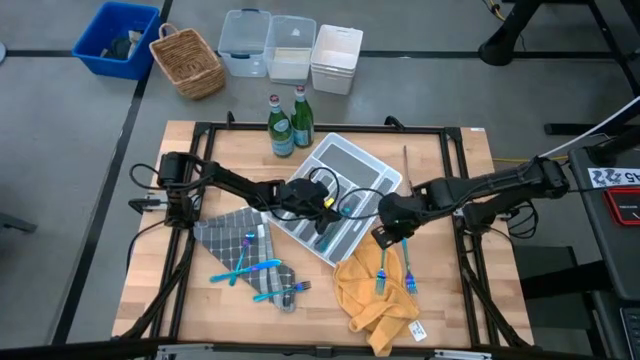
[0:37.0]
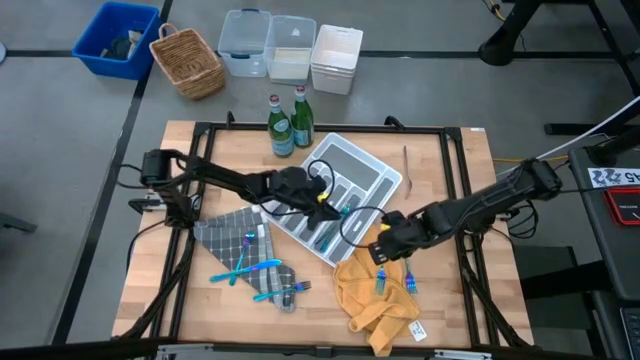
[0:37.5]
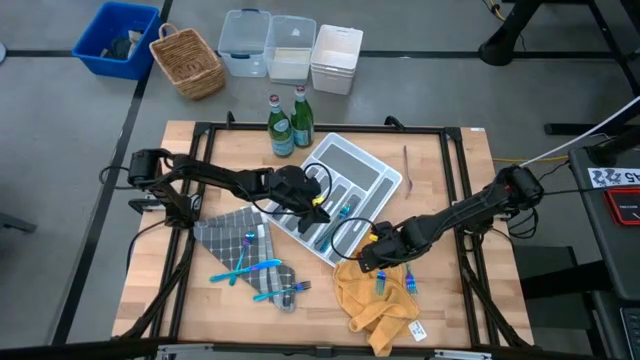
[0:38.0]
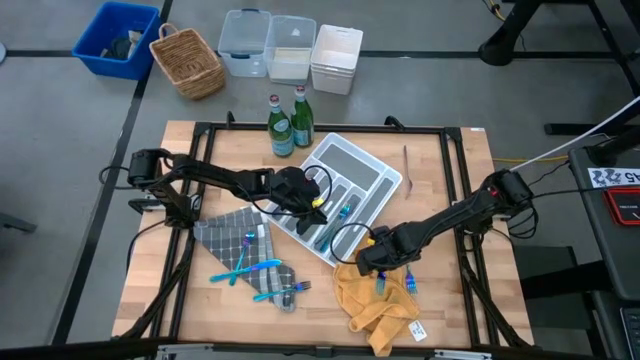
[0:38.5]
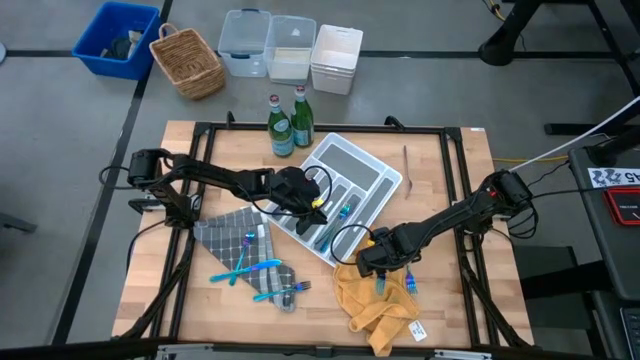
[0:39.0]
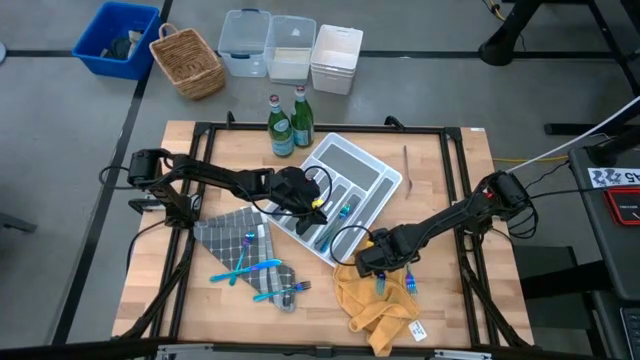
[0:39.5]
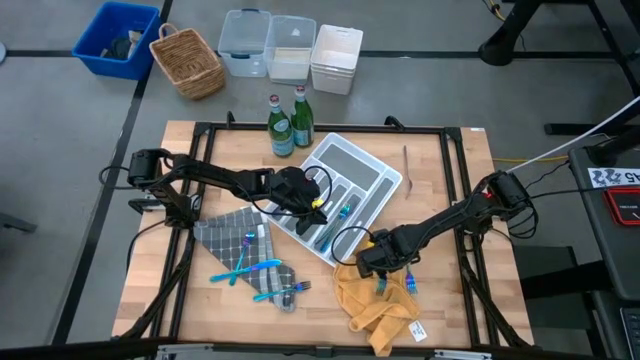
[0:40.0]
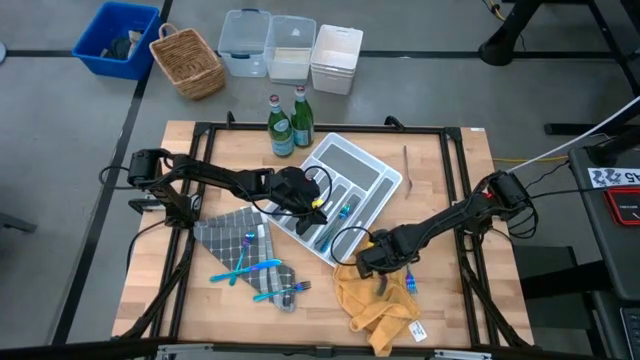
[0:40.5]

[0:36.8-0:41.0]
Put the blue fork into the cutlery tray

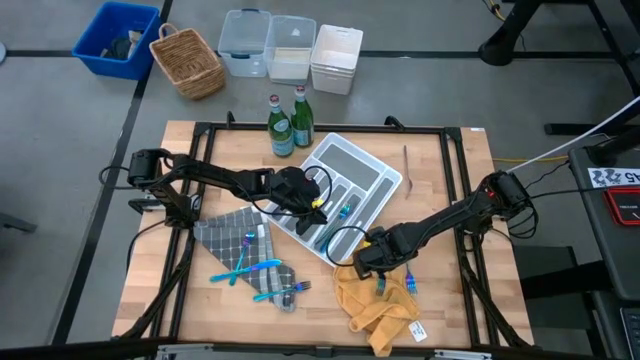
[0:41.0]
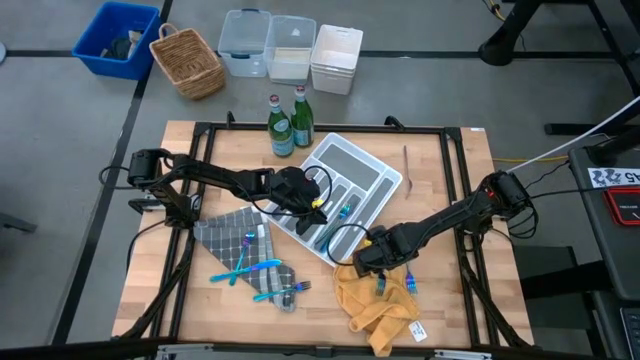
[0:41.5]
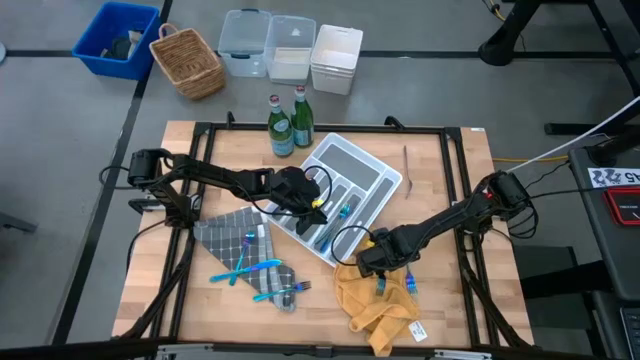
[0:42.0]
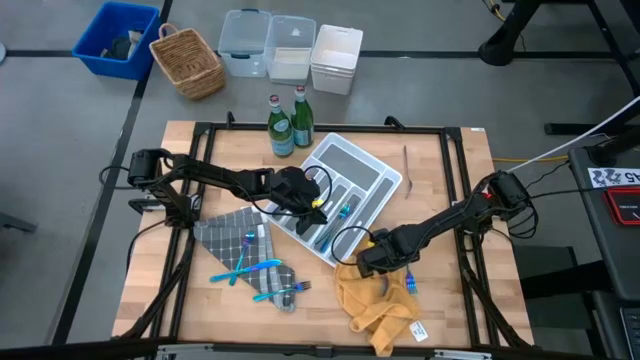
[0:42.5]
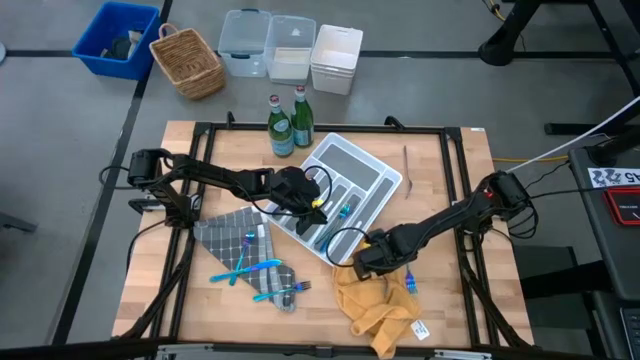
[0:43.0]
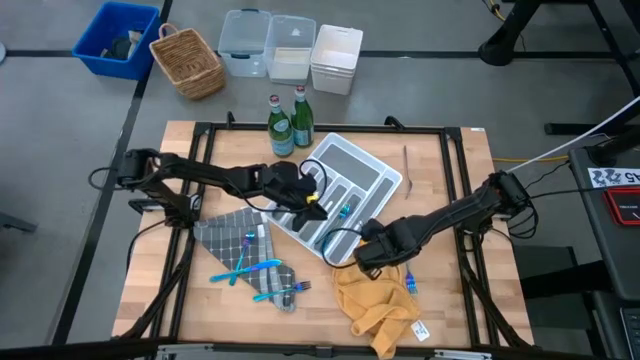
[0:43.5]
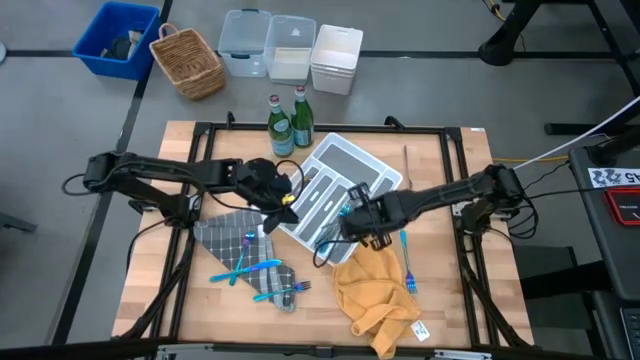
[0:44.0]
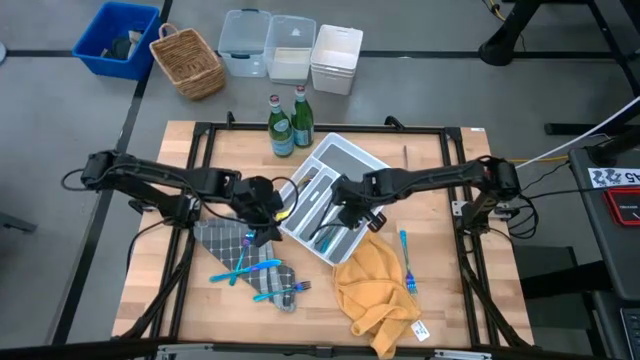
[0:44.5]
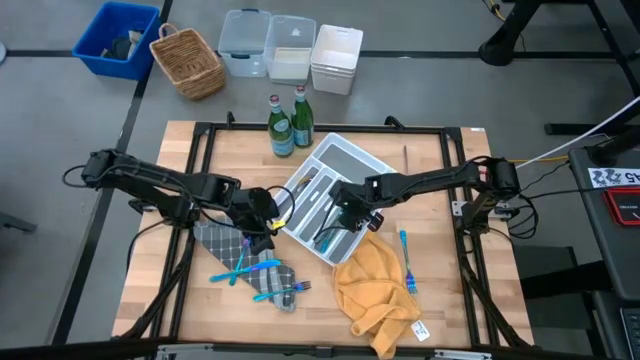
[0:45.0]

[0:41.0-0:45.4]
Put the blue fork into the cutlery tray

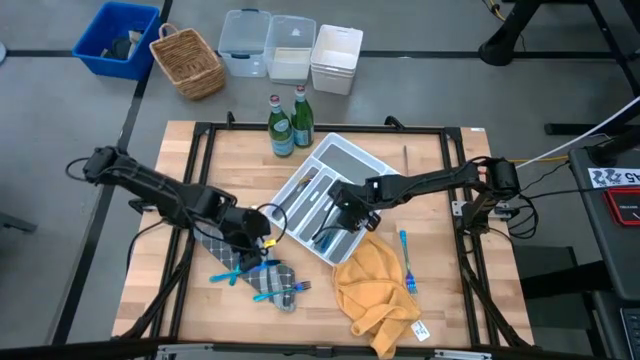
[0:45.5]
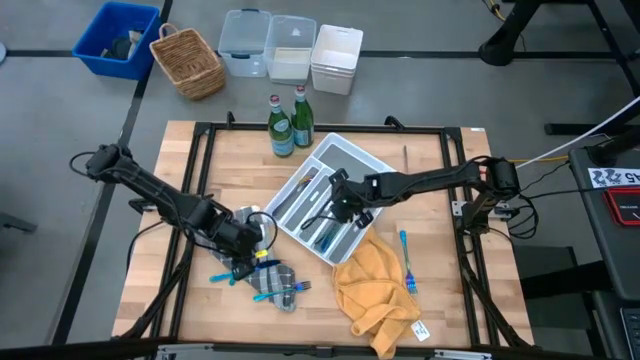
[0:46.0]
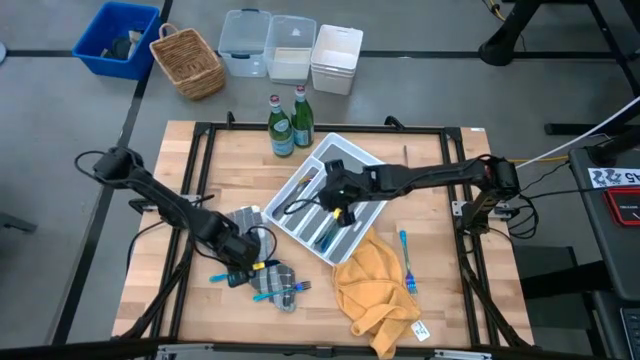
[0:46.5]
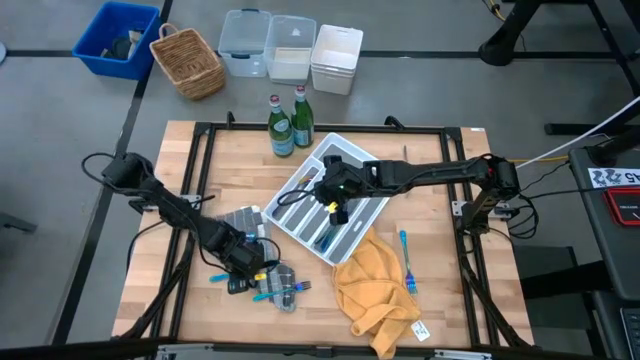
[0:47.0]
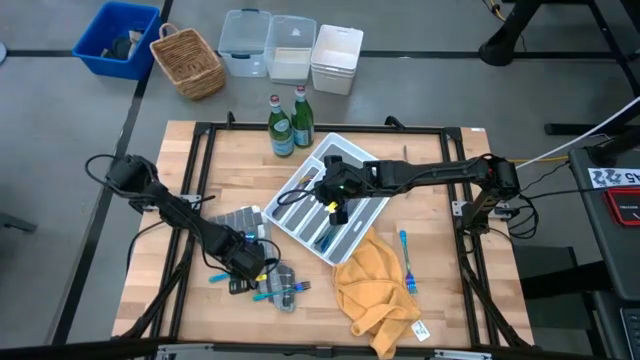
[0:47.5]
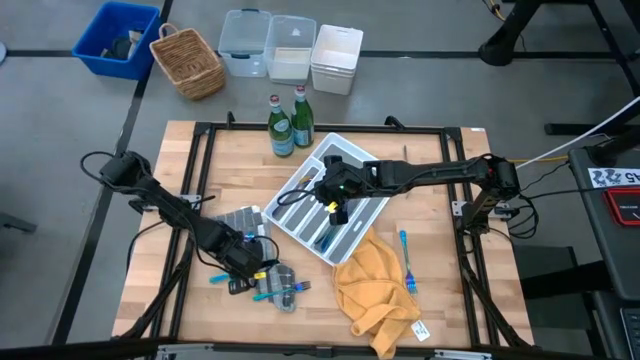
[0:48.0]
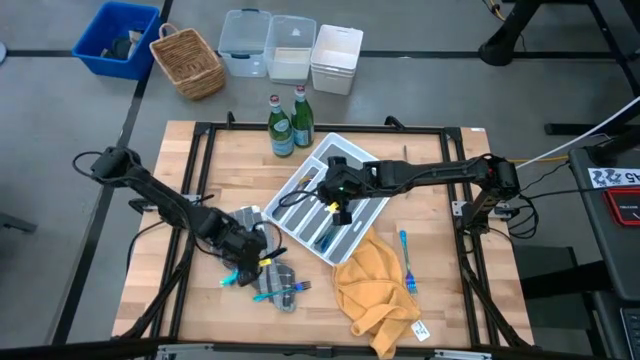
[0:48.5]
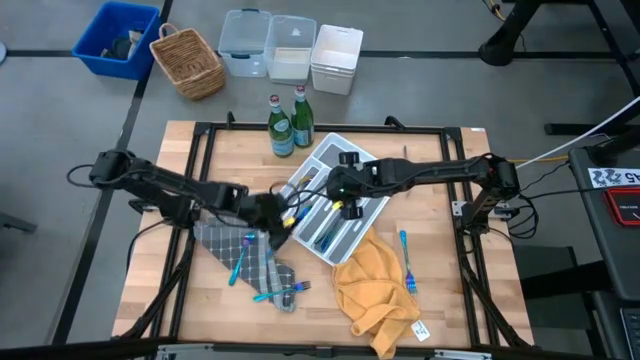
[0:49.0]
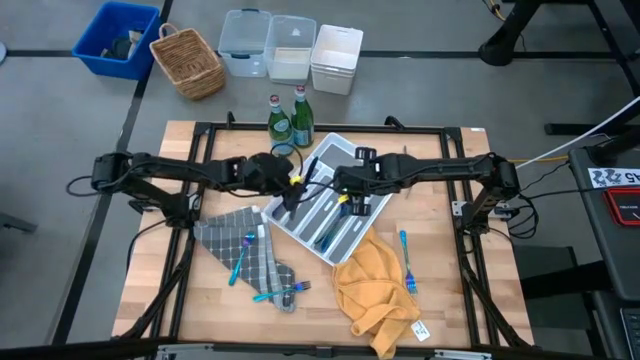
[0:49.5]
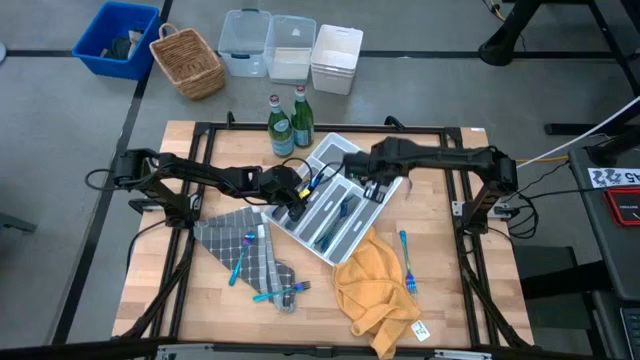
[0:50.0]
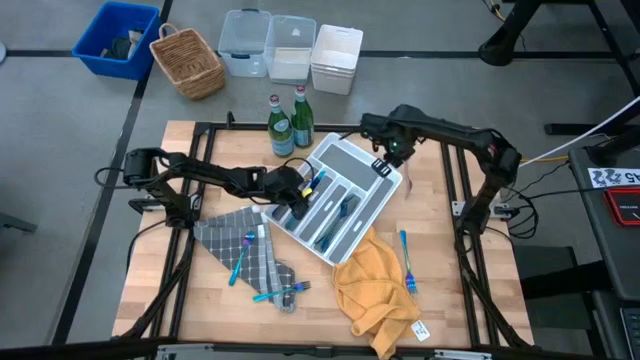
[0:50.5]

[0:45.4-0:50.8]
Put the blue knife into the cutlery tray

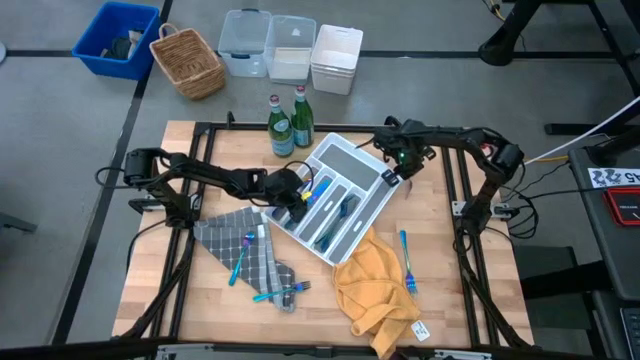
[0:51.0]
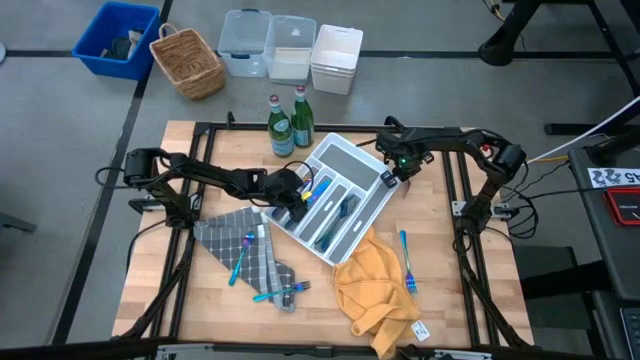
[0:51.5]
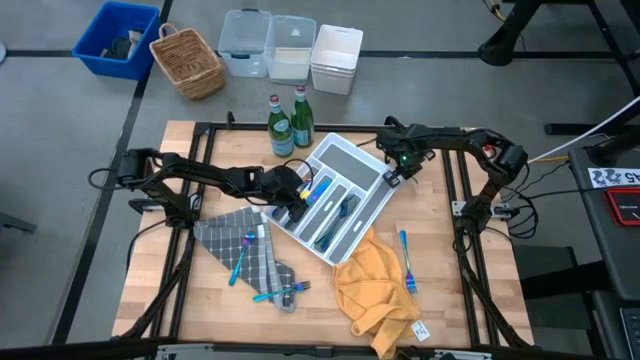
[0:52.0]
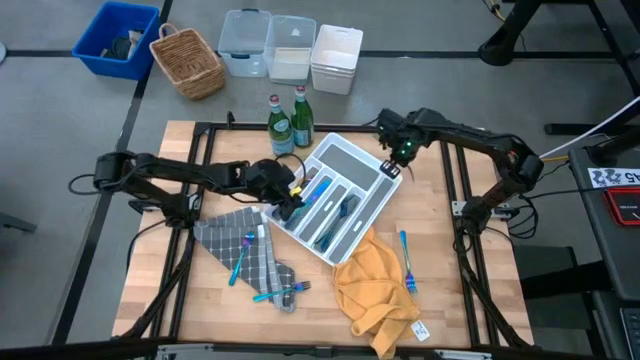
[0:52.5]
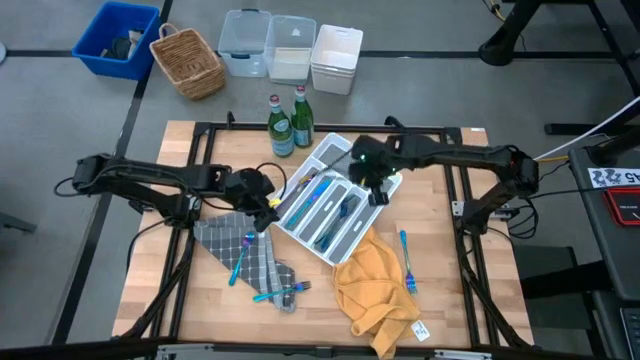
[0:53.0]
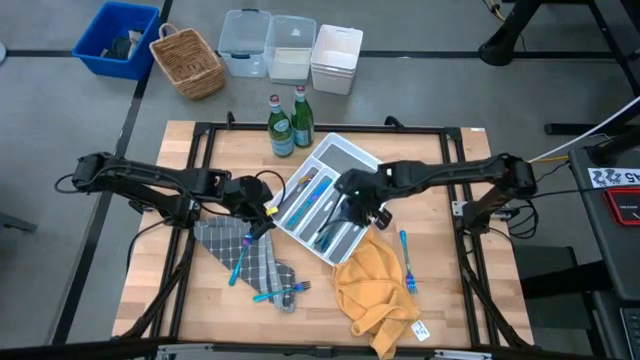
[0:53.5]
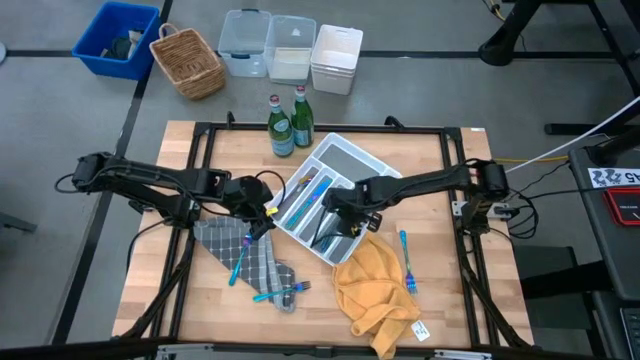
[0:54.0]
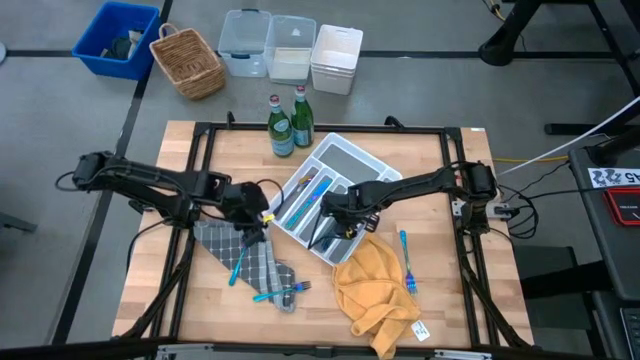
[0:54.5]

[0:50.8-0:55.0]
Put the blue fork into the cutlery tray

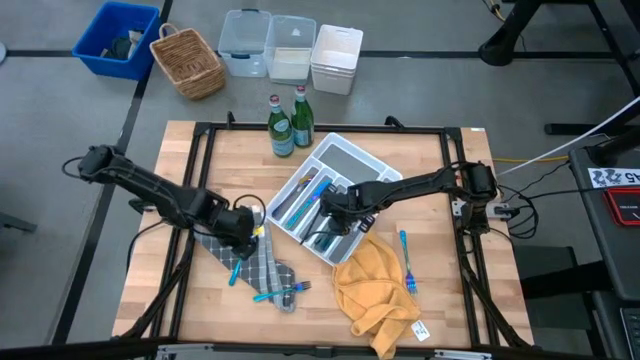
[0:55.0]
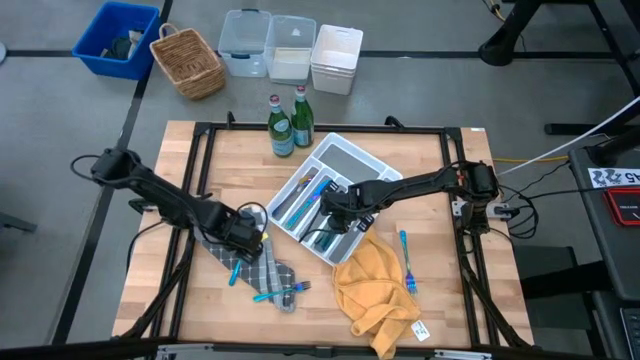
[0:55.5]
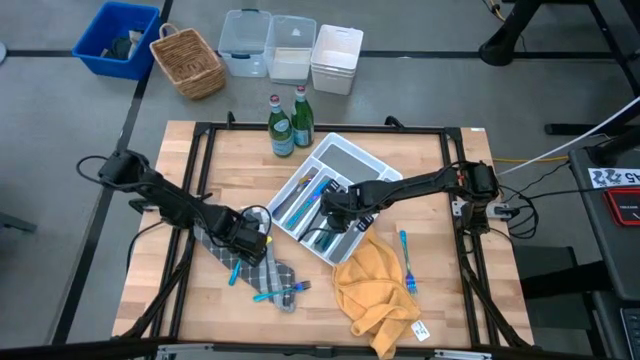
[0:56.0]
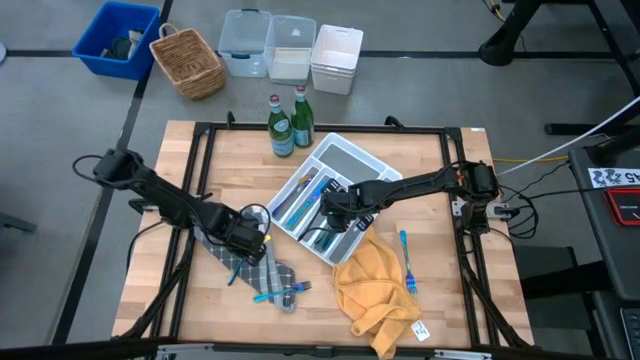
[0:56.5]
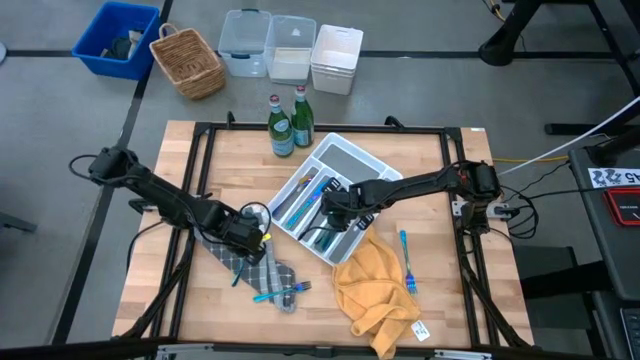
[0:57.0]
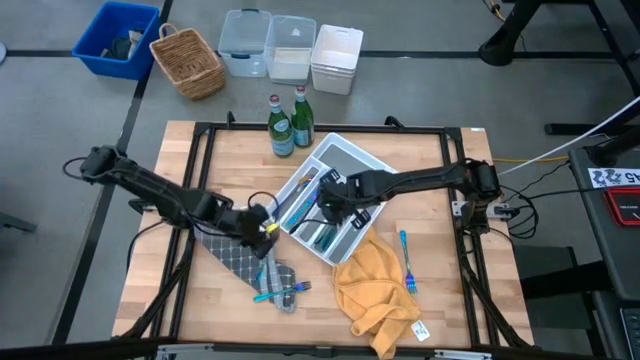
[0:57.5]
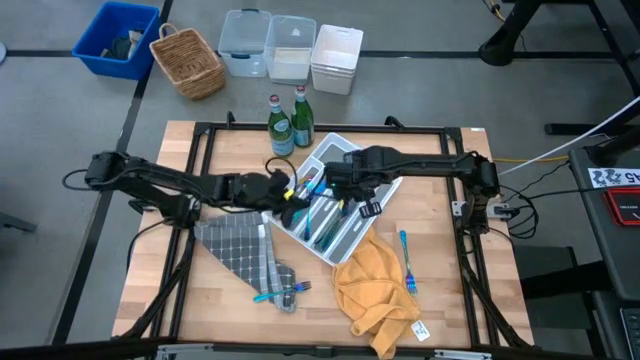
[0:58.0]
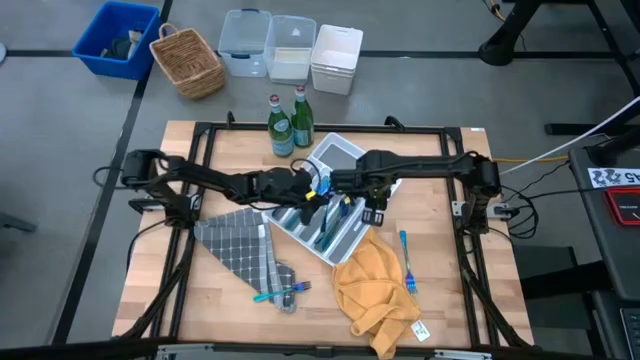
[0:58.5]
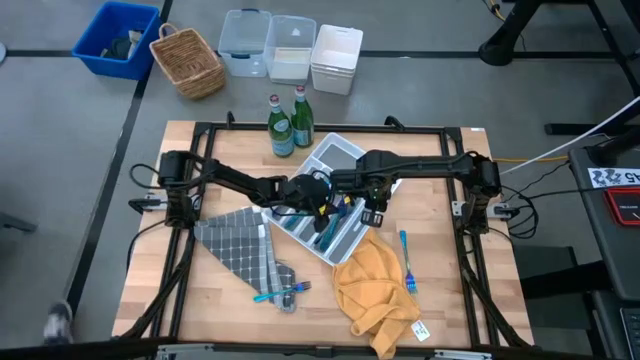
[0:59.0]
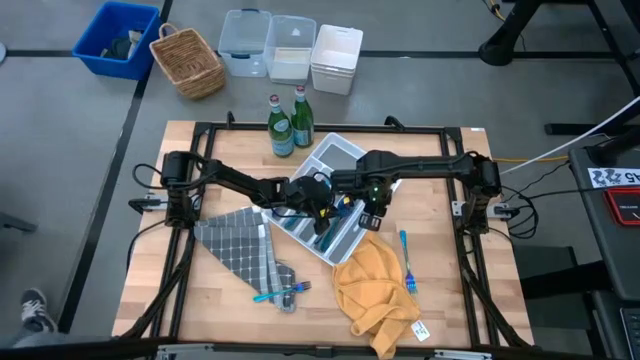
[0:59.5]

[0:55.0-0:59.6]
Put the blue fork into the cutlery tray
